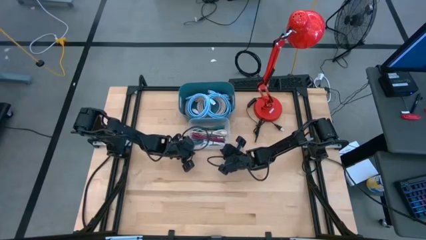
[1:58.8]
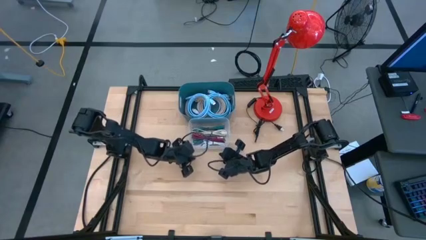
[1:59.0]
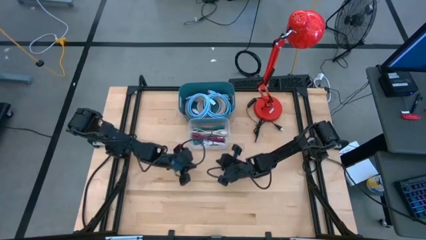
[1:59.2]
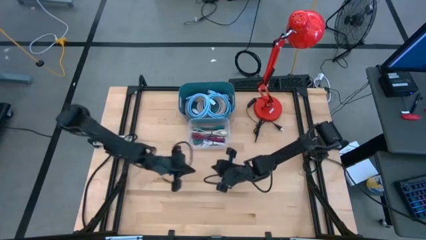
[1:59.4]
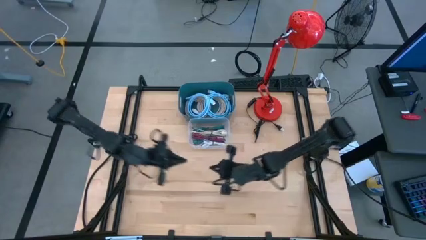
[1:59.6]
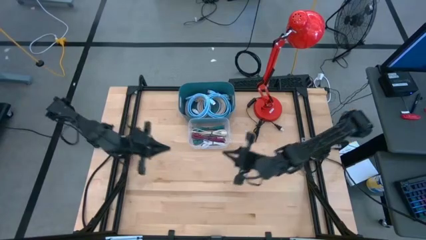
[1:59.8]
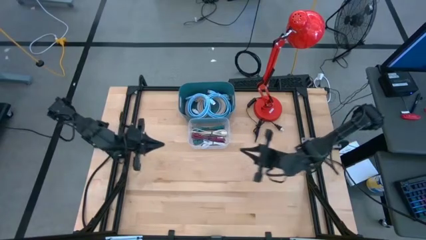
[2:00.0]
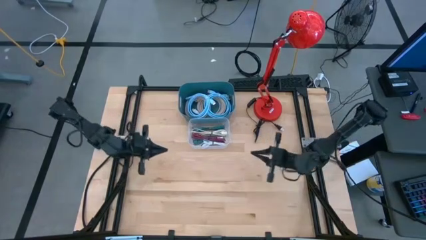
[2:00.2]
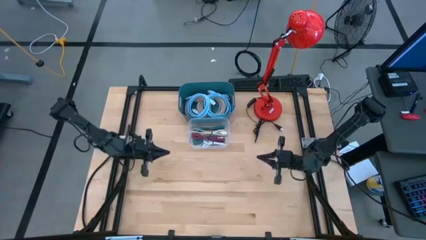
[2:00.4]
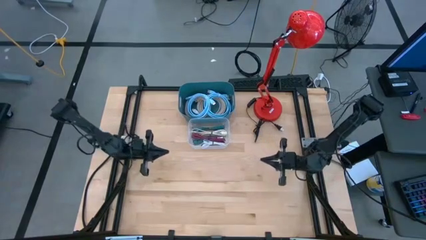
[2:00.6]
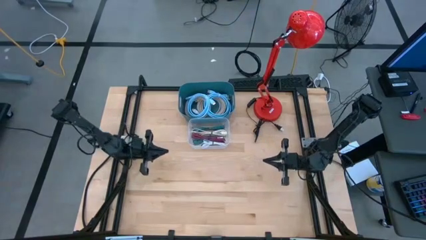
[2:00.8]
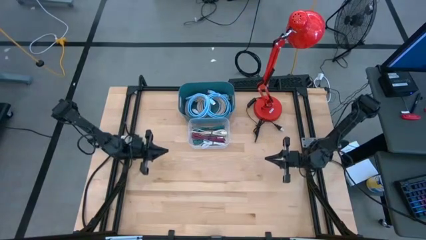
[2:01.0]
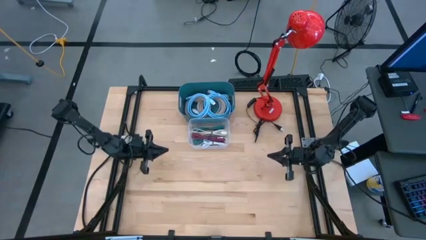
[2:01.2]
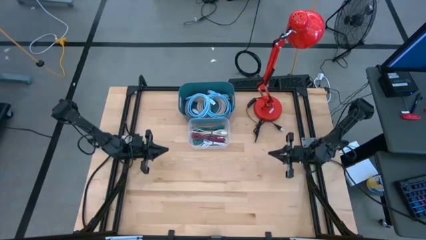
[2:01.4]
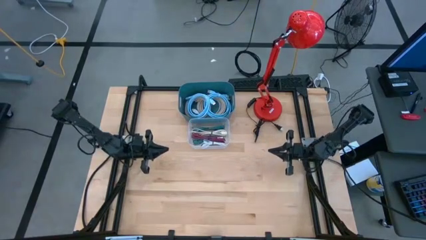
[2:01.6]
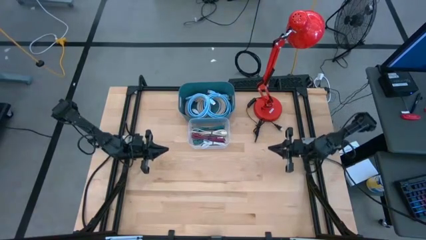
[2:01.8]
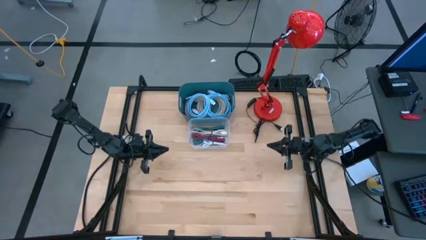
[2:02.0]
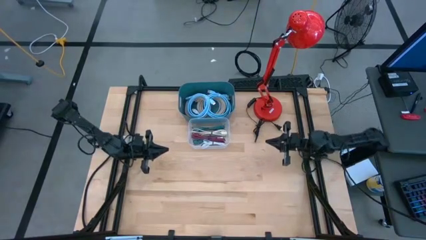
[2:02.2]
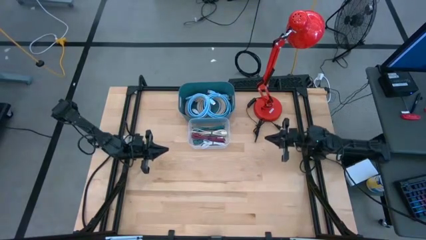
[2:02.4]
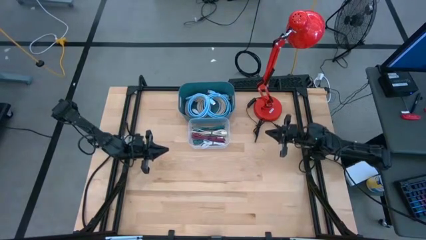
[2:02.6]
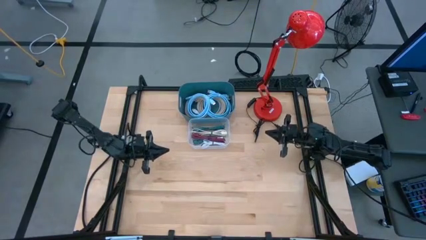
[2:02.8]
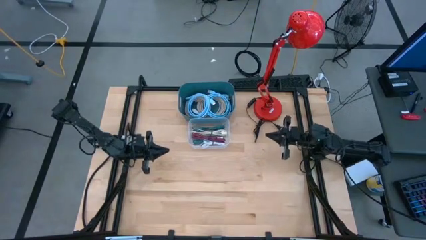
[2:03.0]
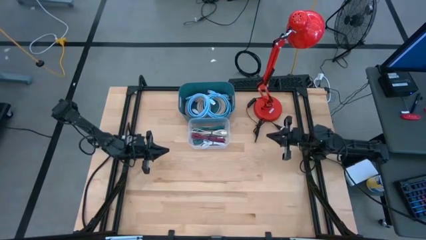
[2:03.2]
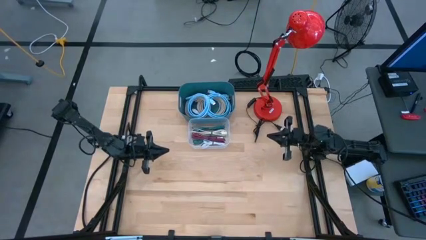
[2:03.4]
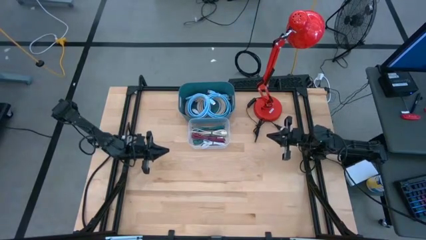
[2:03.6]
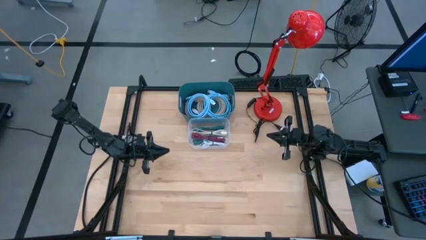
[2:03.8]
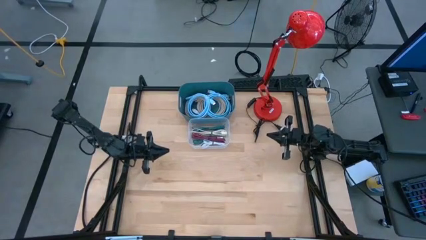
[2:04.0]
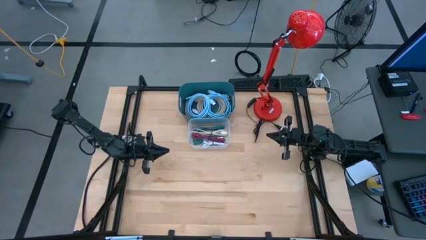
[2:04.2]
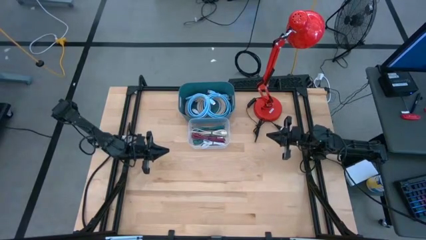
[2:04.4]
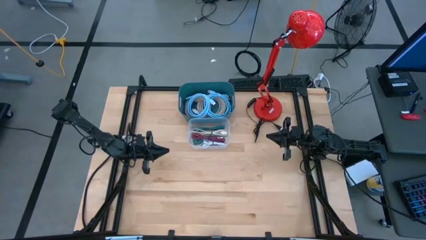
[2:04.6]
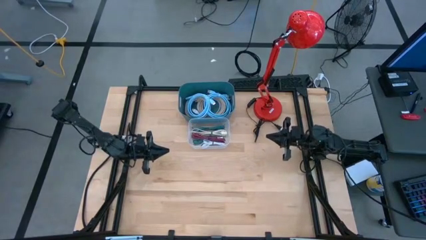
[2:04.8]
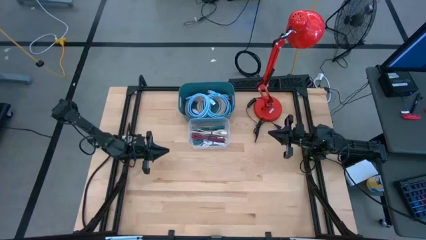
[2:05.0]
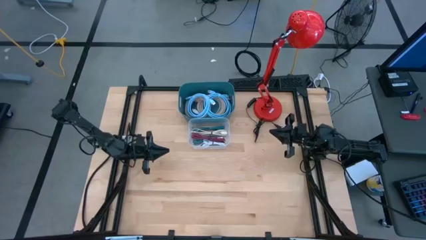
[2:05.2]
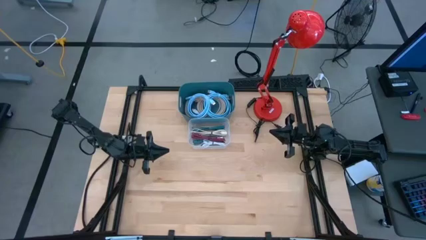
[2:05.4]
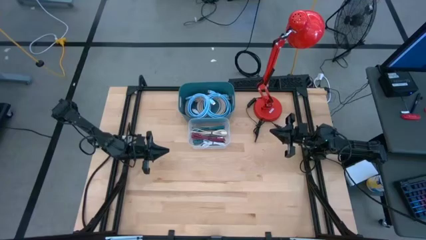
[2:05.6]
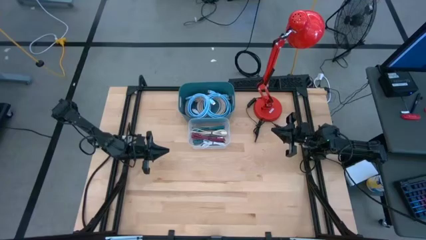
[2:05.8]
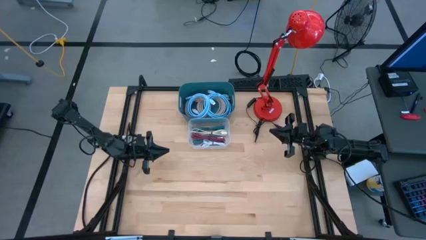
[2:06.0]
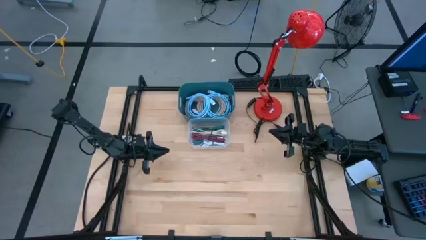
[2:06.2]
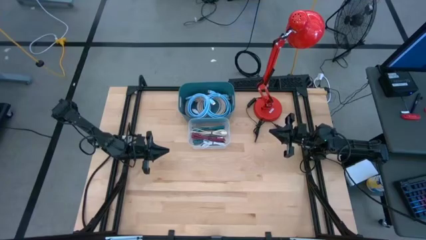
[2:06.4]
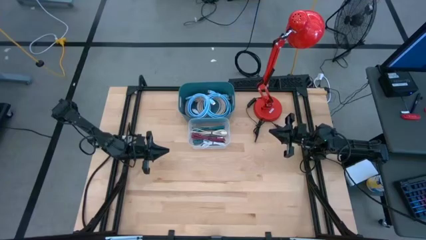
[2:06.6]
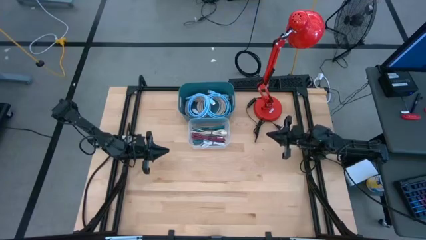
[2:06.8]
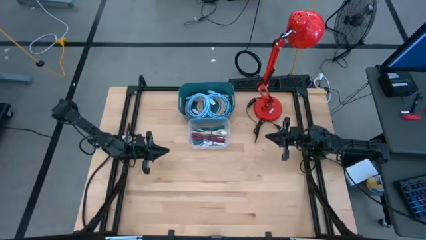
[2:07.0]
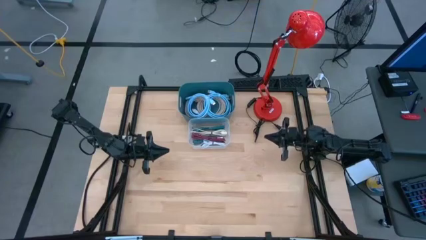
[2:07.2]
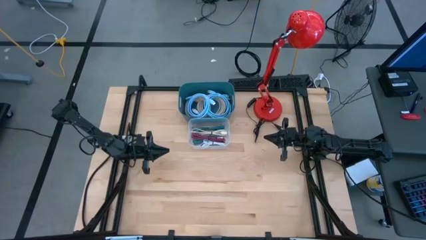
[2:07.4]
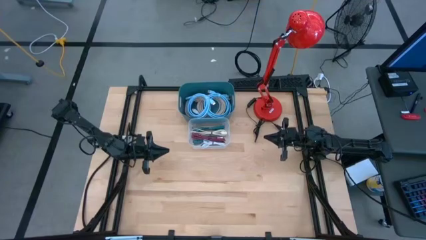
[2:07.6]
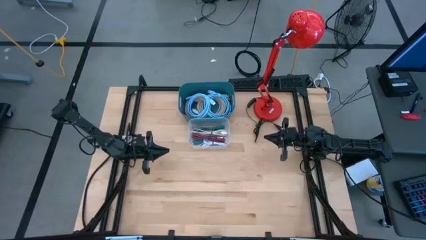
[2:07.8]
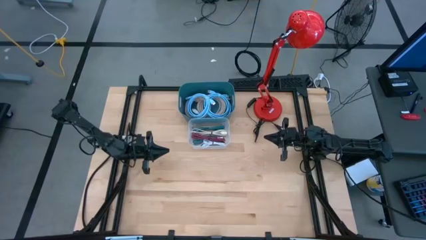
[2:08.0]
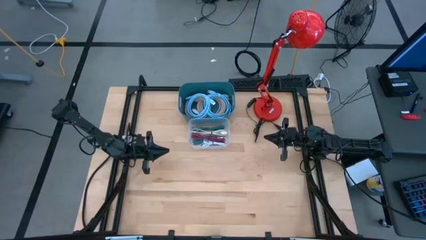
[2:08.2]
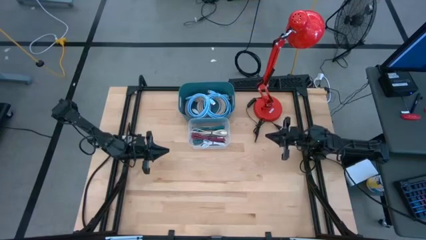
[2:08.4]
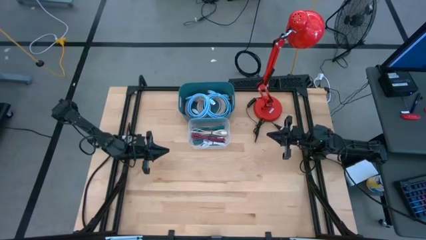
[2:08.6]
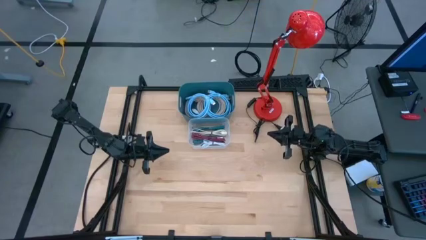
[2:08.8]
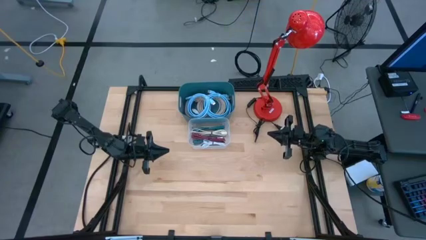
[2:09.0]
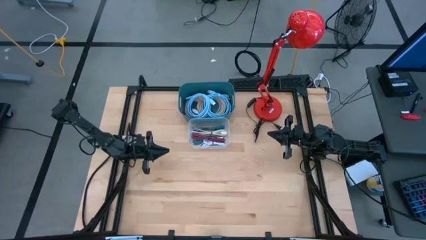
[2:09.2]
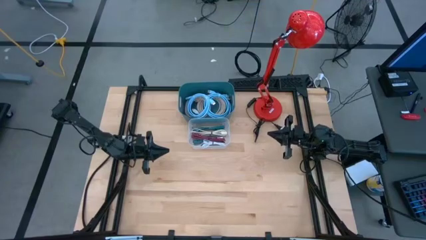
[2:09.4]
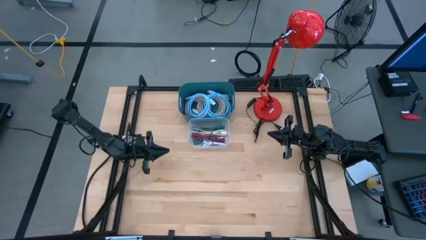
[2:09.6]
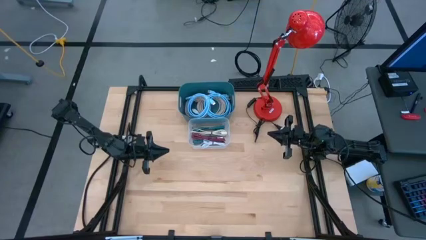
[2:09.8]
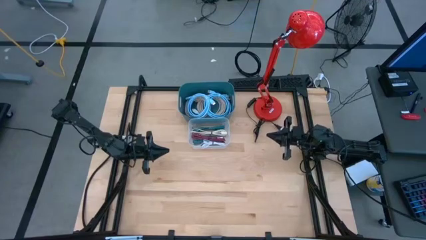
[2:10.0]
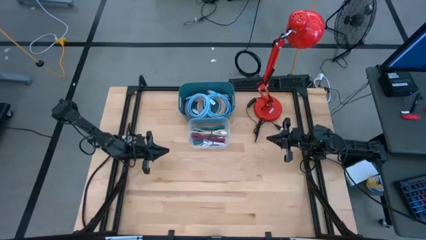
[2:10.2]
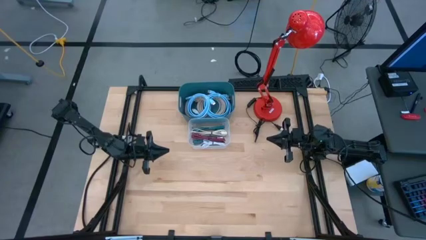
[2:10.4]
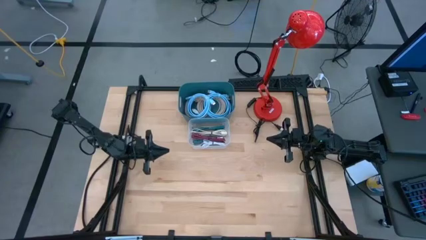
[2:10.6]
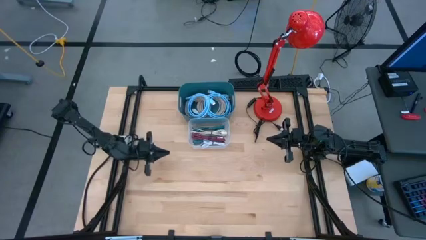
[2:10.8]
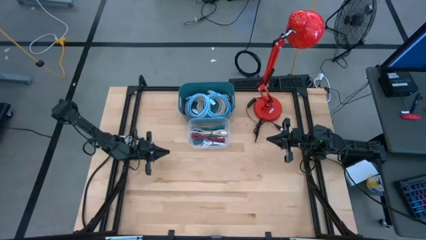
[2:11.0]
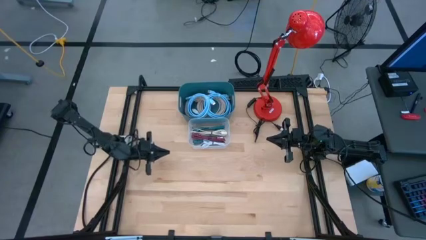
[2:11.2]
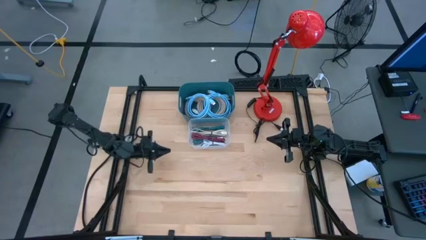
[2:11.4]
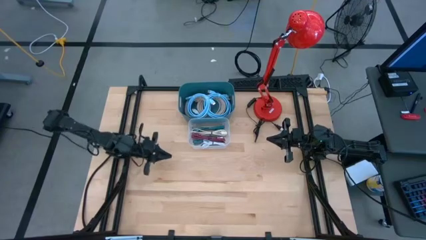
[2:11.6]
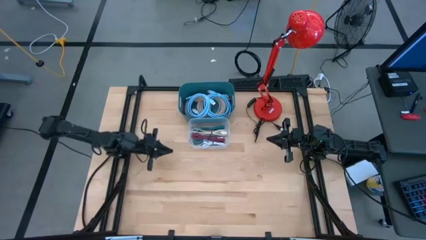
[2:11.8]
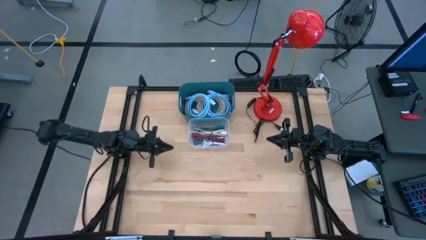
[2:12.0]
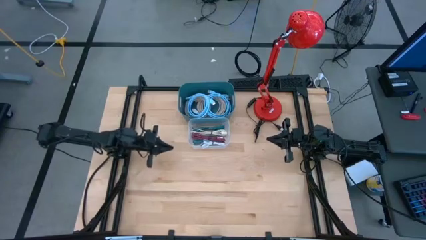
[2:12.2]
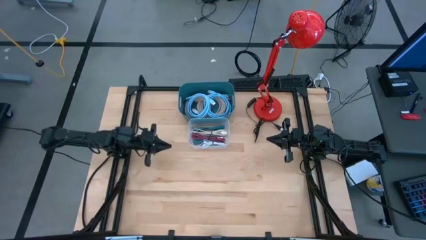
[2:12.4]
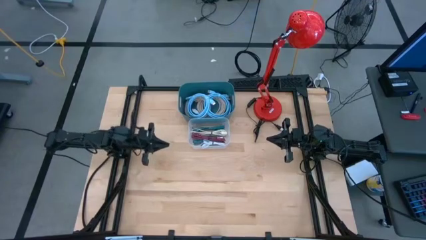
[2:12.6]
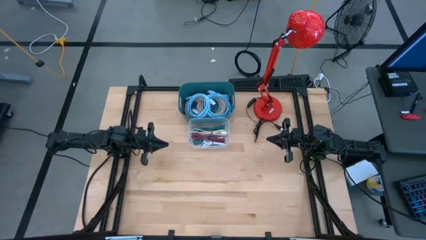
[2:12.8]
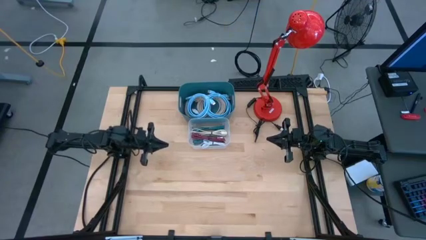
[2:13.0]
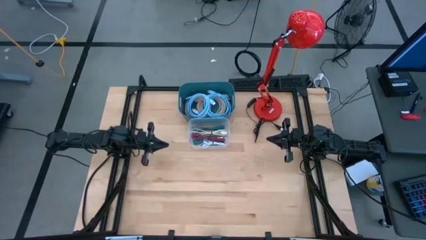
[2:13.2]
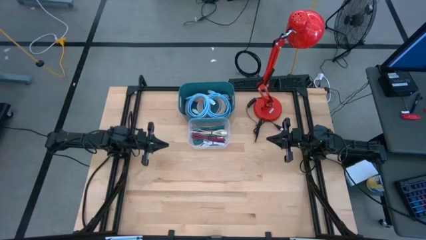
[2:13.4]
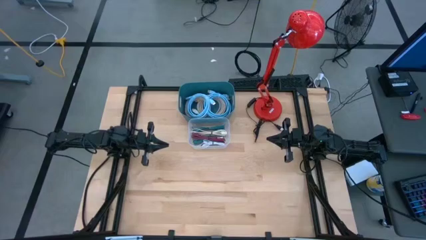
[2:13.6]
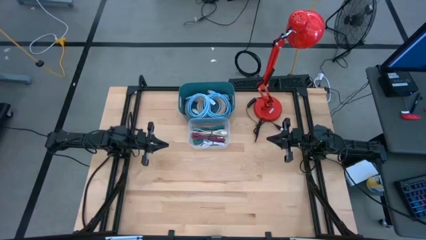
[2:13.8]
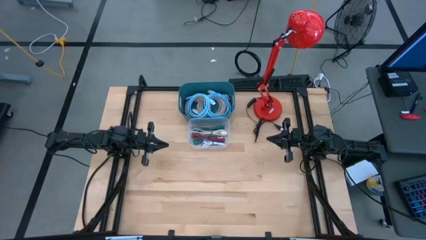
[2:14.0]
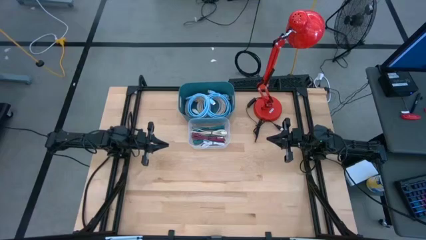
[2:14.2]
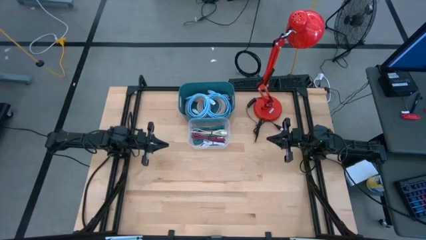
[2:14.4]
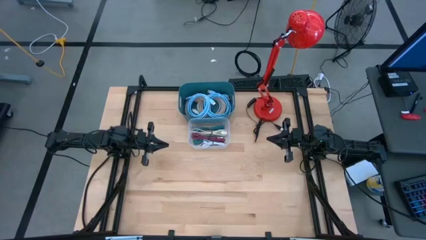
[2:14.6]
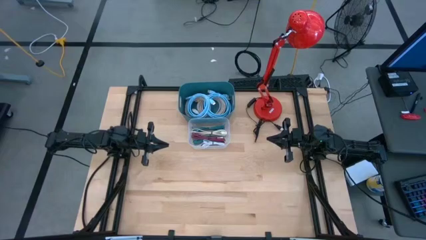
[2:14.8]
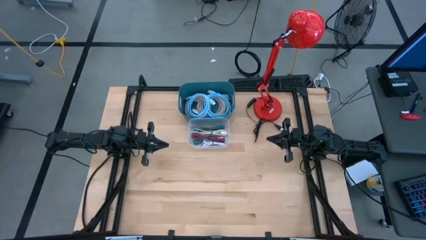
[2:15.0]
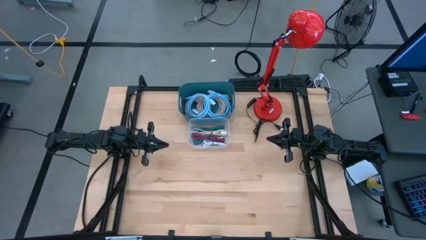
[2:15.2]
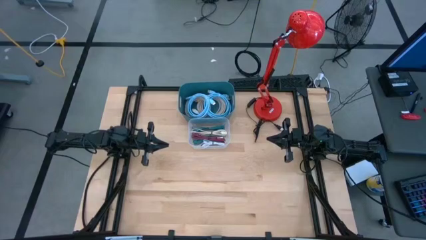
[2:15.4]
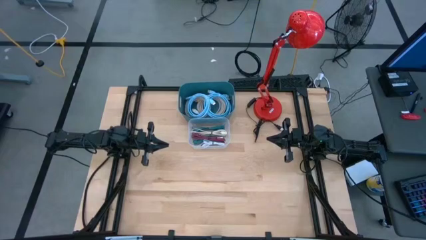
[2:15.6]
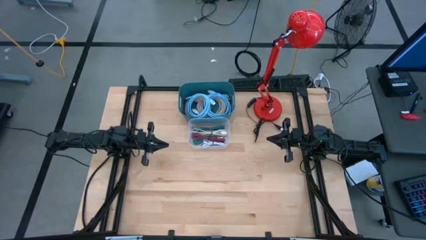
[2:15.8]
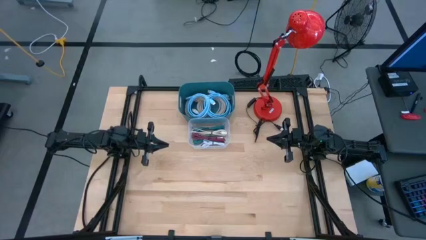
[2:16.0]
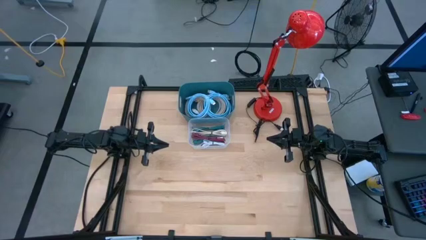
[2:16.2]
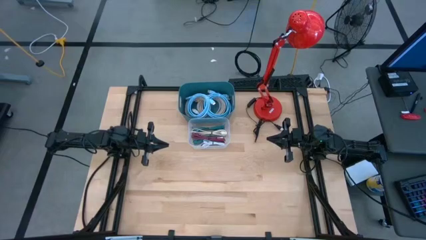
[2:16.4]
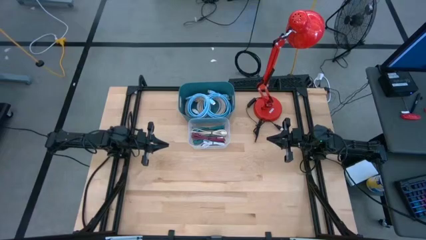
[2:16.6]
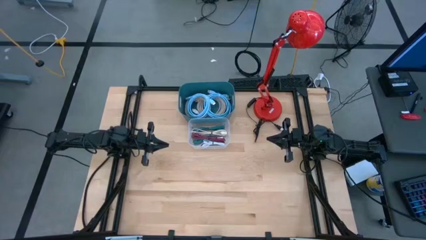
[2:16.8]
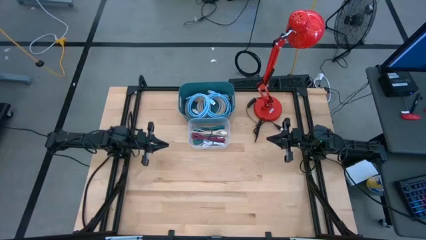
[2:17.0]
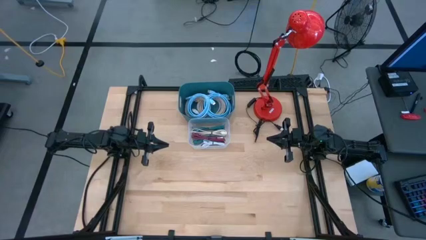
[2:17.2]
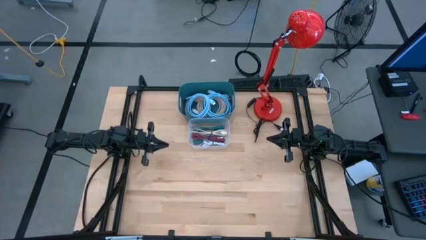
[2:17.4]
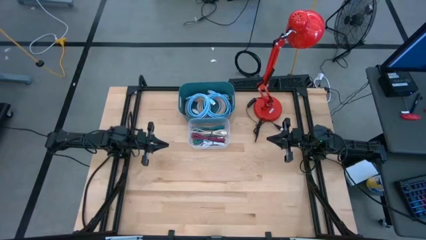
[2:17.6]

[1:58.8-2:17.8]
Task: Pick & Place USB Port
Return to Home Position
